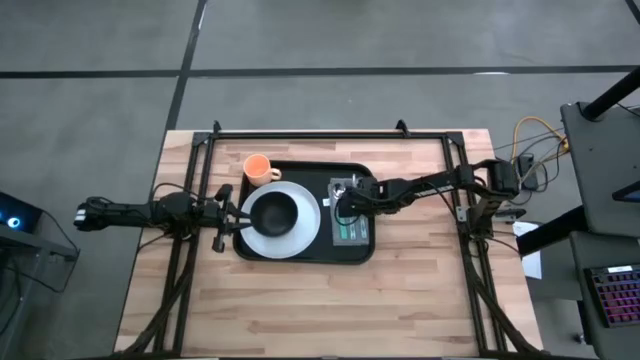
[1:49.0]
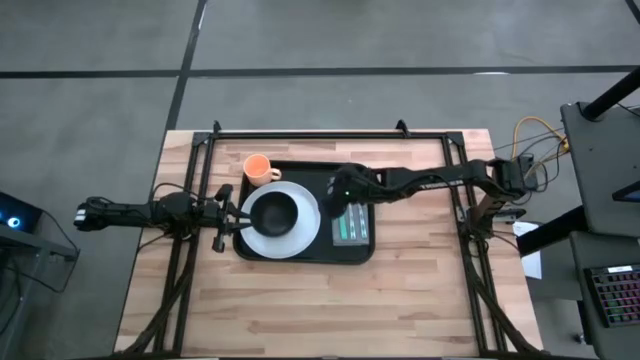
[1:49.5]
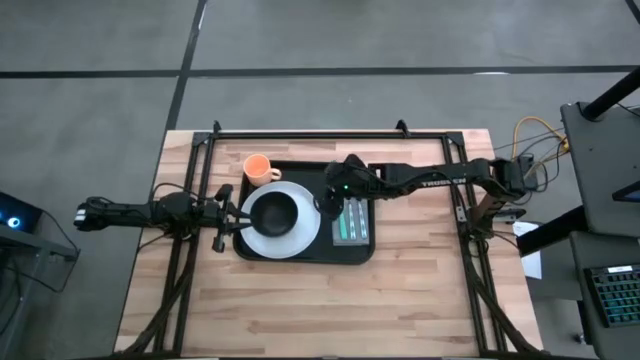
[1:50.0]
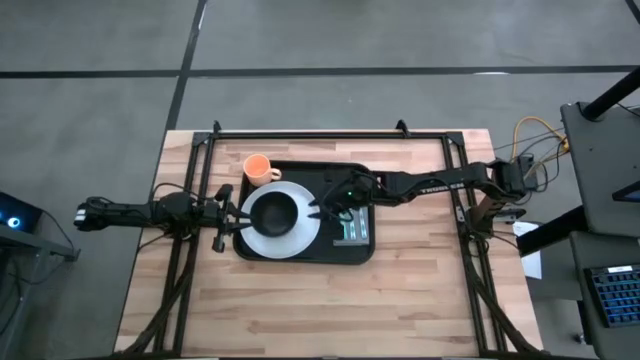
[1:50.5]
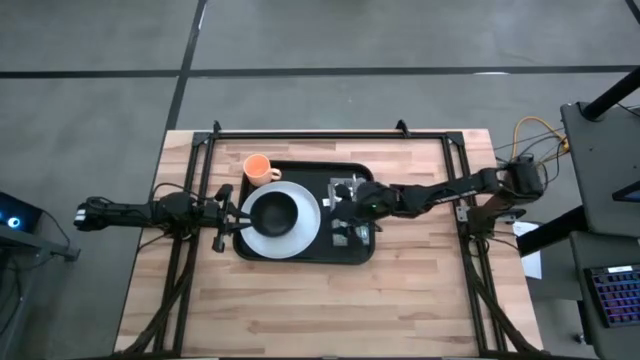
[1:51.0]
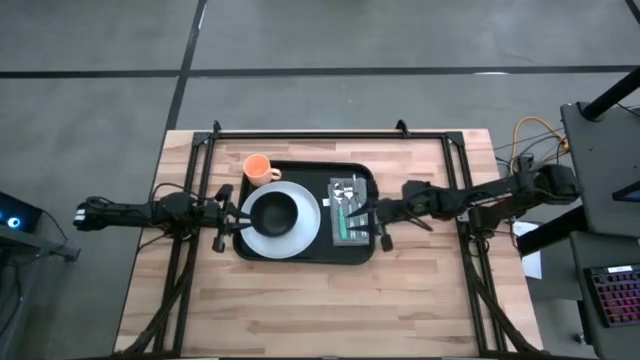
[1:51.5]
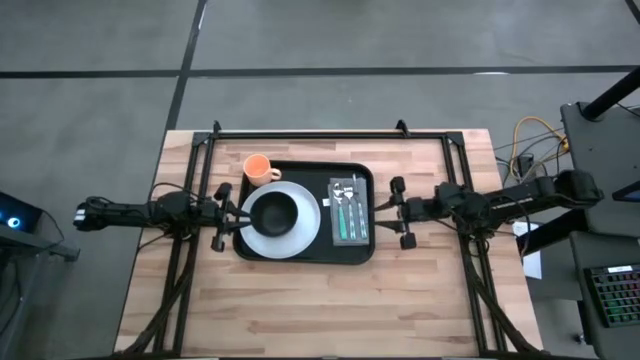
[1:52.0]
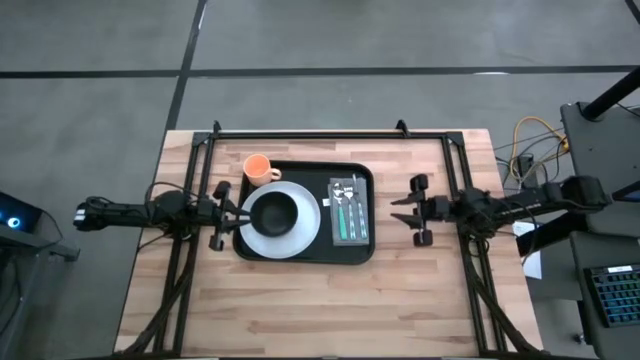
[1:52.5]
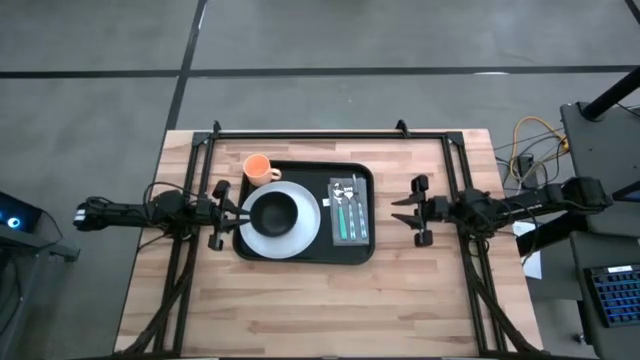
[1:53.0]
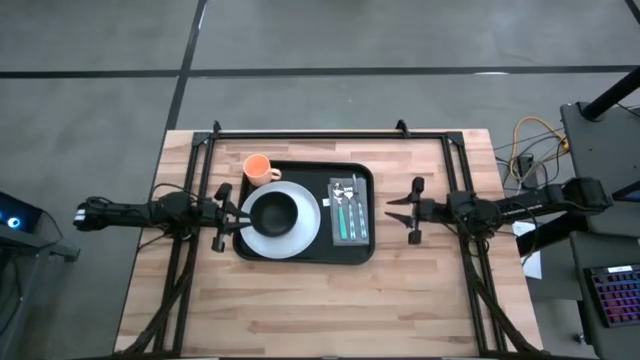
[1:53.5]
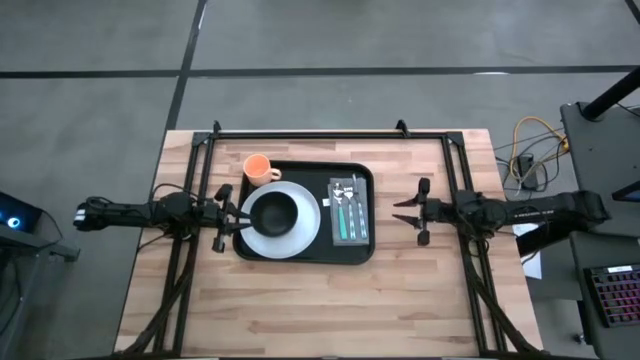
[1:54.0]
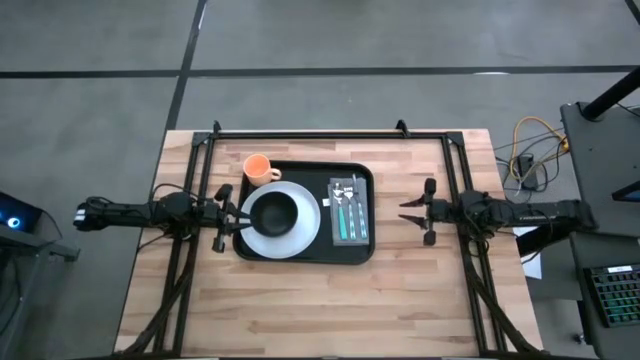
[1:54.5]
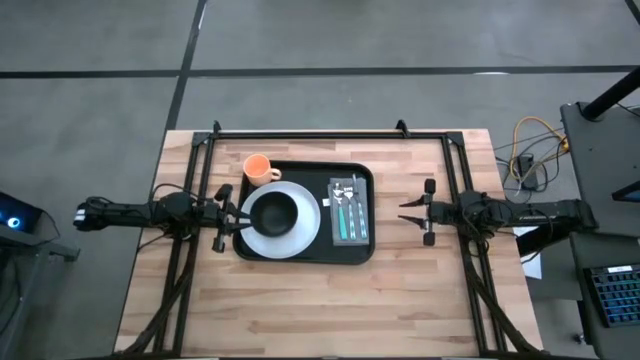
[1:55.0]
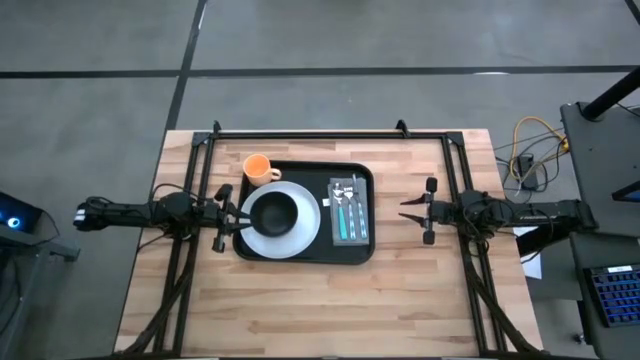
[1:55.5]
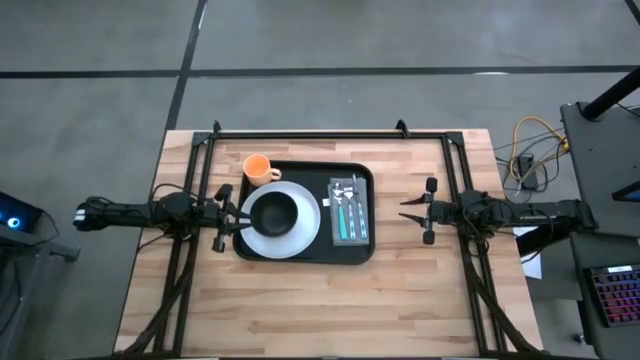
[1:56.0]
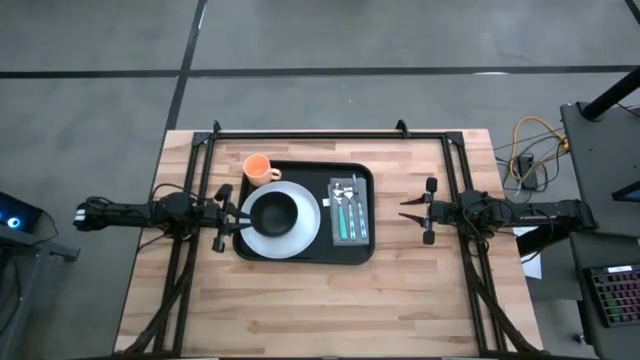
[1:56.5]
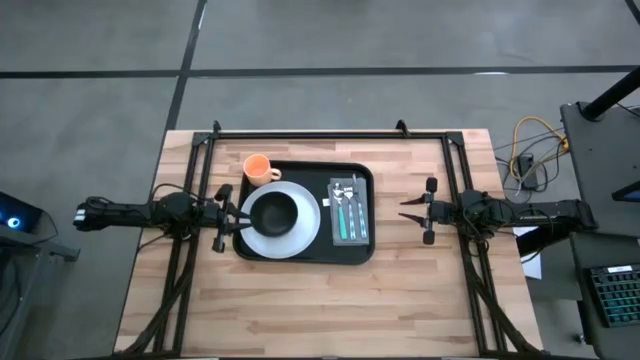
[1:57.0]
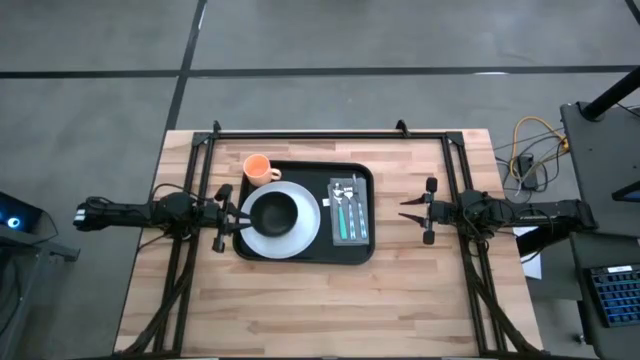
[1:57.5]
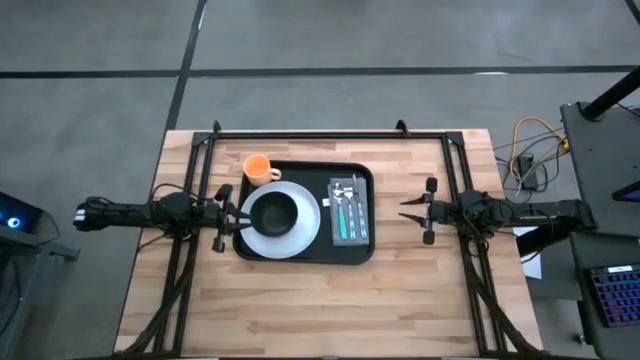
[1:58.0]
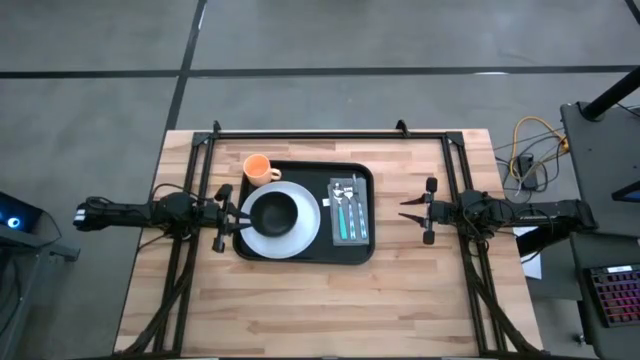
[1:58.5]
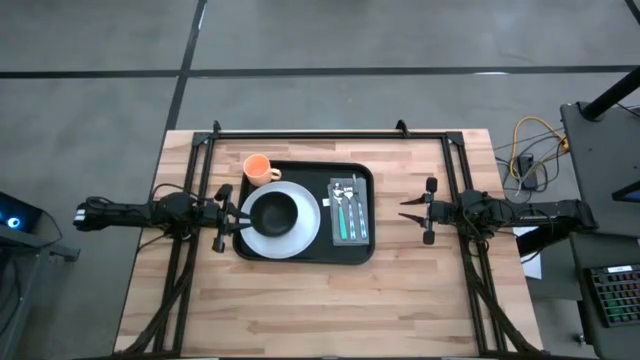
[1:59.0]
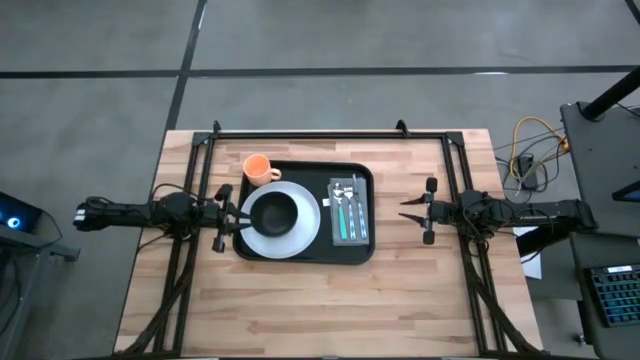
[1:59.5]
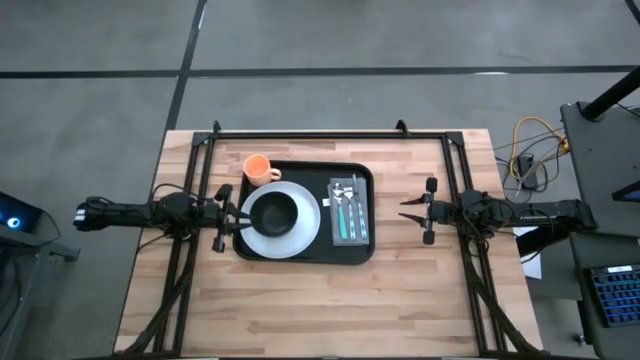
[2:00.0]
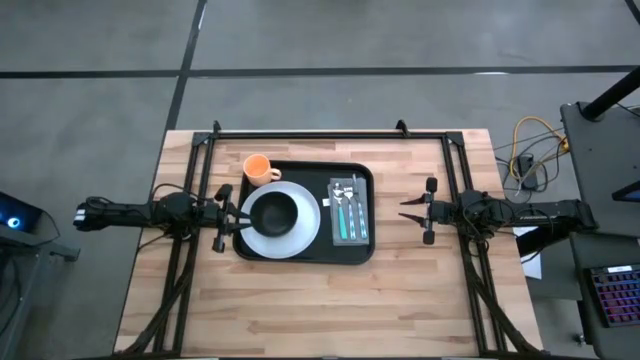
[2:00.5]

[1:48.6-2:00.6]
Task: Set up tray
Return to Home Position

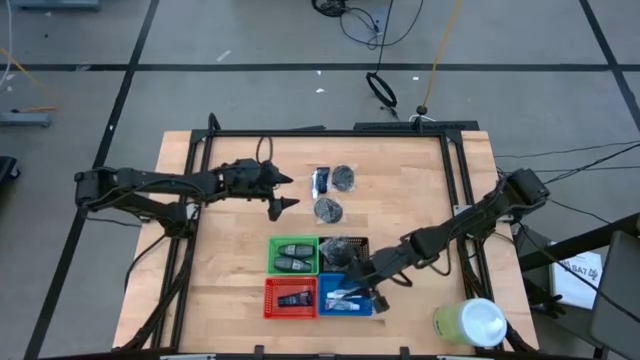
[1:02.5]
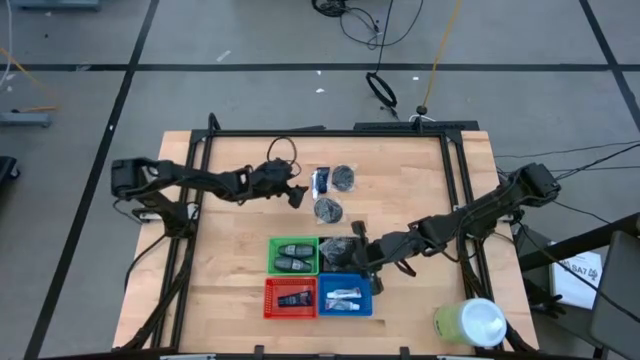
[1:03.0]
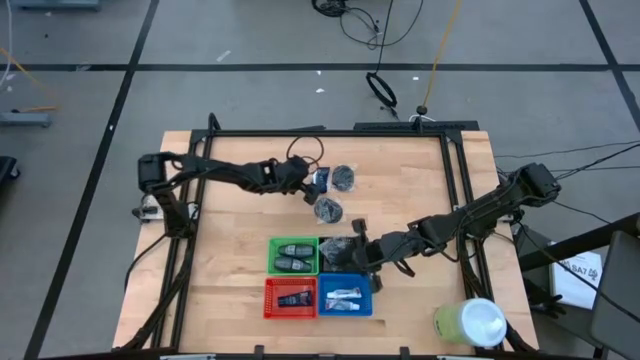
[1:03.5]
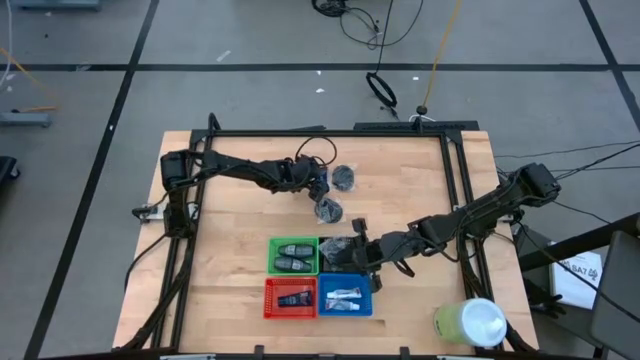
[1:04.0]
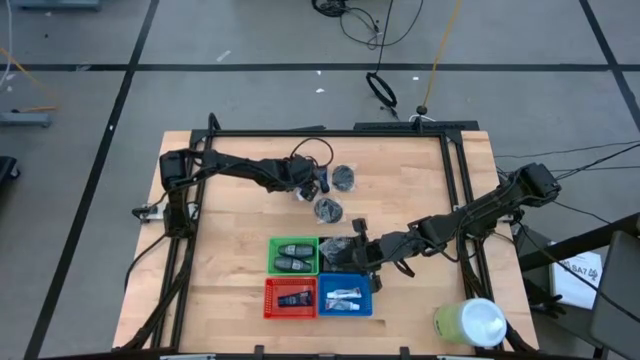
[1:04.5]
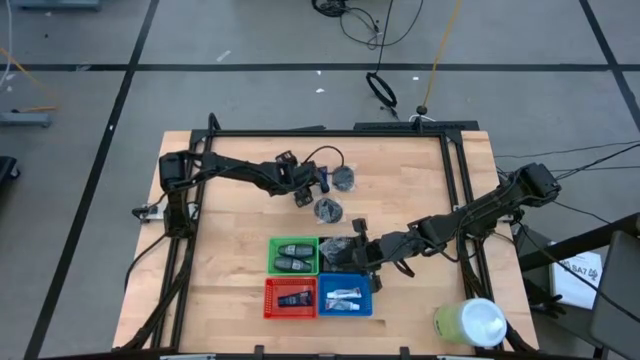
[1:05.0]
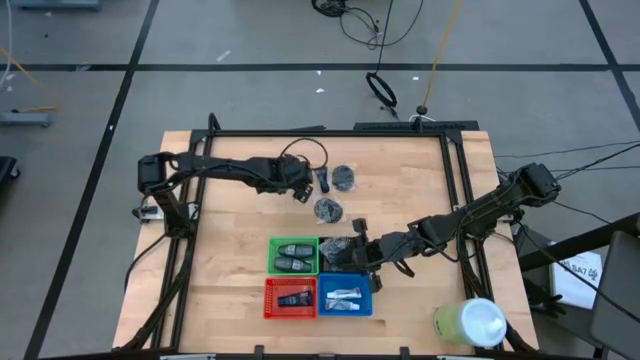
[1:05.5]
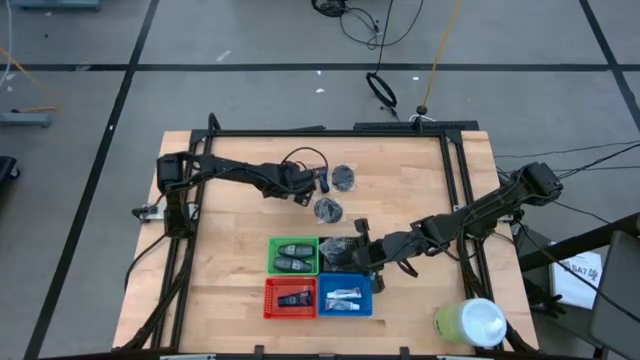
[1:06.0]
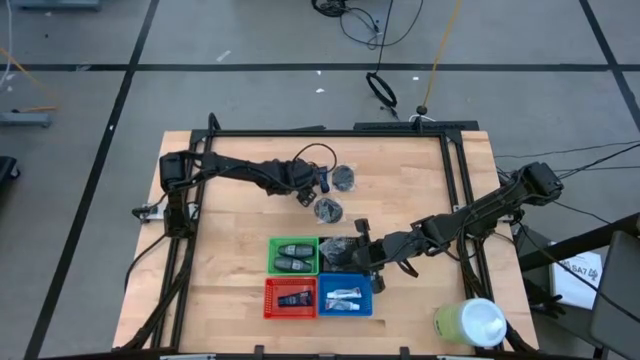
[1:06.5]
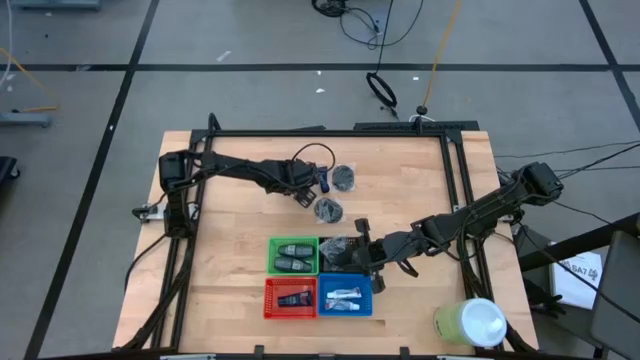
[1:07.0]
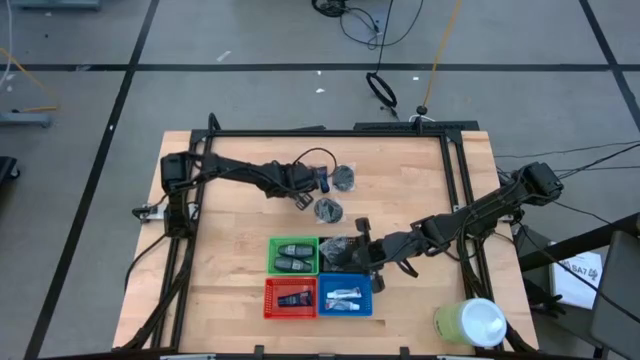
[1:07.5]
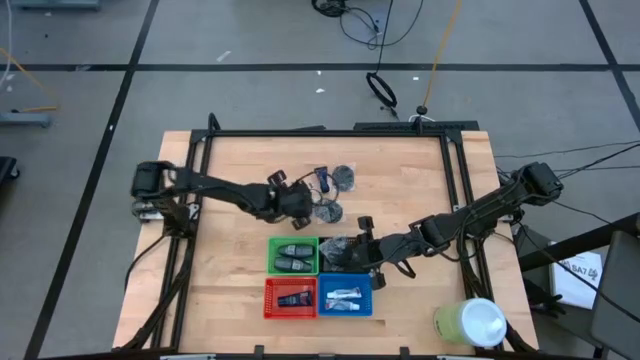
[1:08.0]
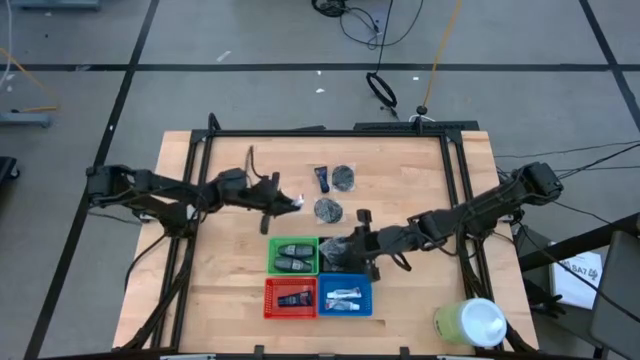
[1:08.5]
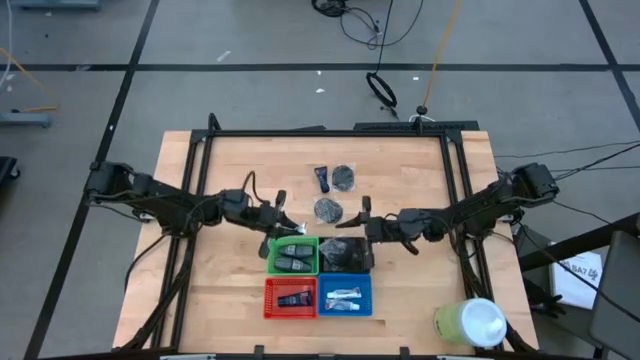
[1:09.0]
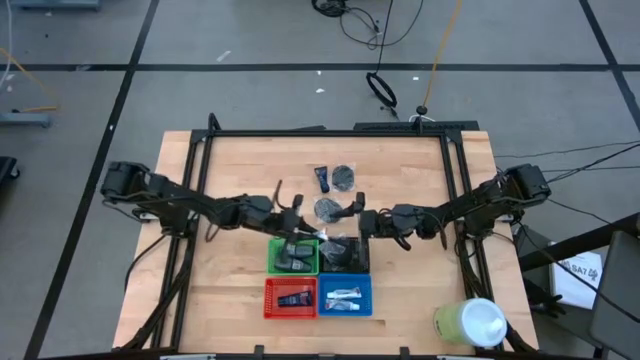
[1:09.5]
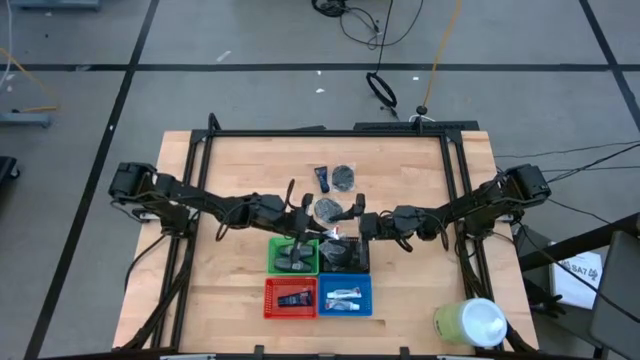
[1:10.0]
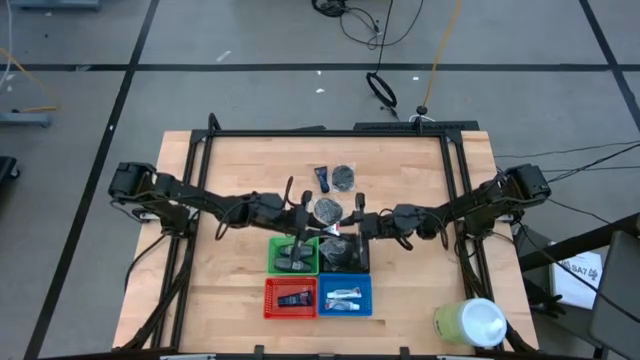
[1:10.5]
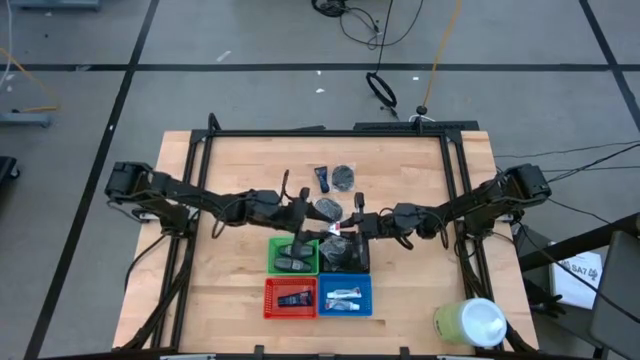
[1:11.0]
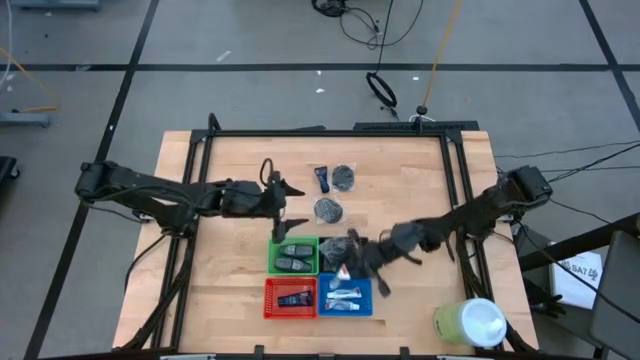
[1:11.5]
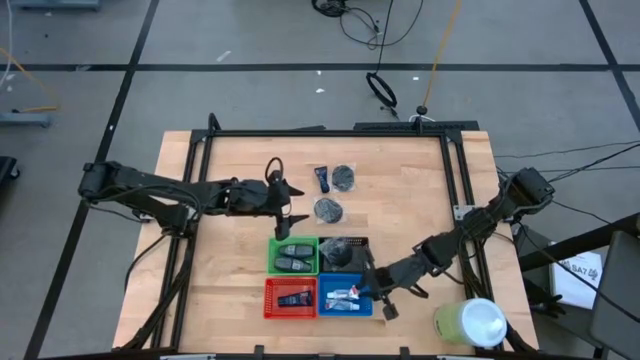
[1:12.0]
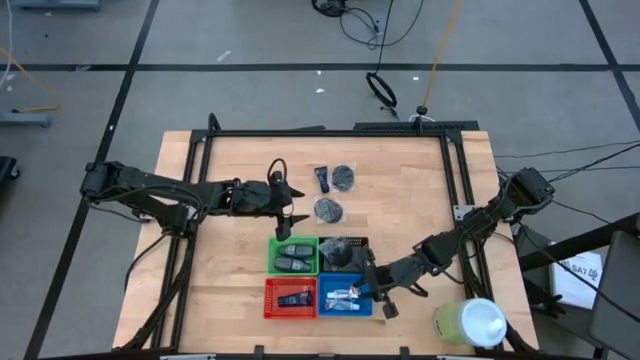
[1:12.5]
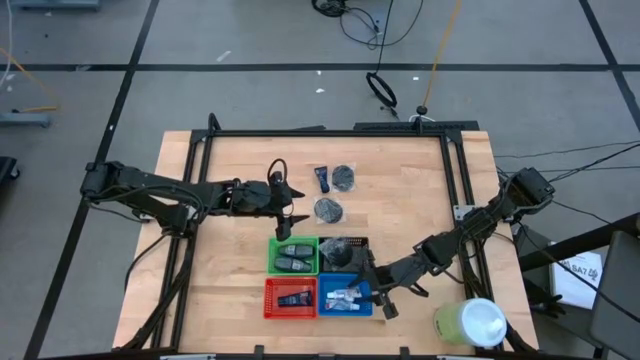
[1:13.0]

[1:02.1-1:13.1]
Task: Pick & Place Travel size toiletries
Put the white toothpaste into the blue bin
